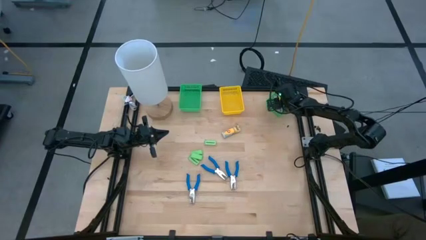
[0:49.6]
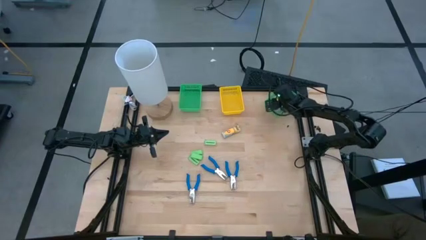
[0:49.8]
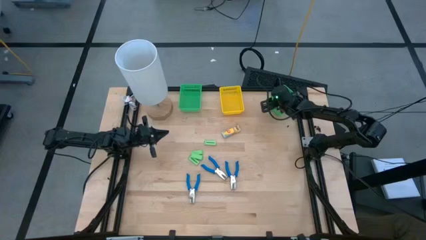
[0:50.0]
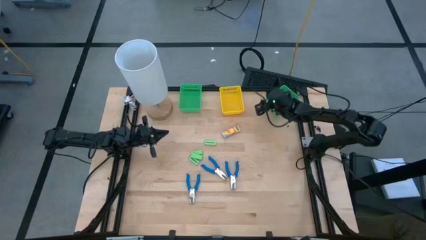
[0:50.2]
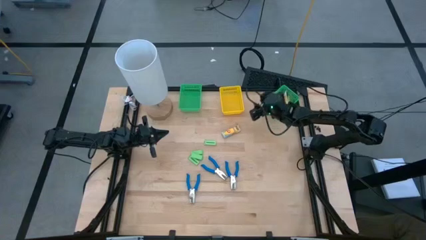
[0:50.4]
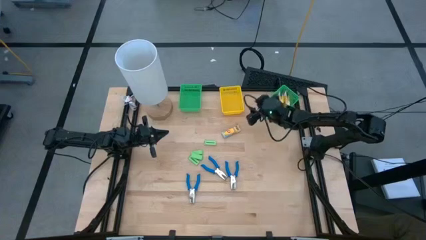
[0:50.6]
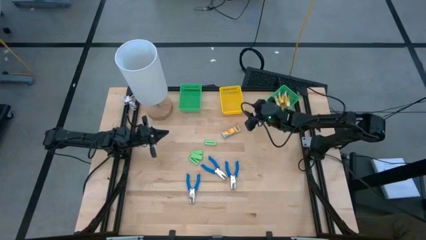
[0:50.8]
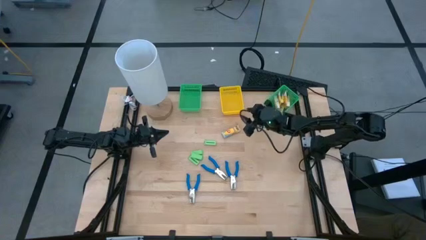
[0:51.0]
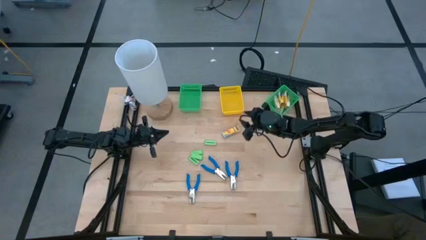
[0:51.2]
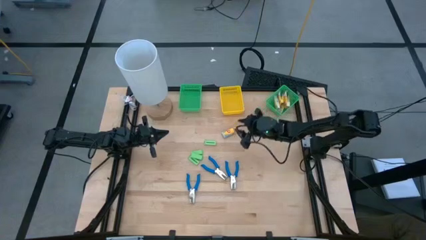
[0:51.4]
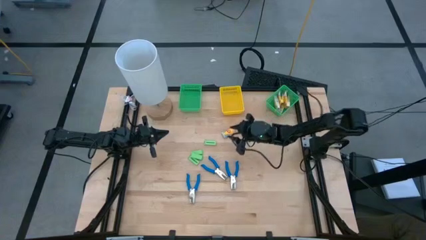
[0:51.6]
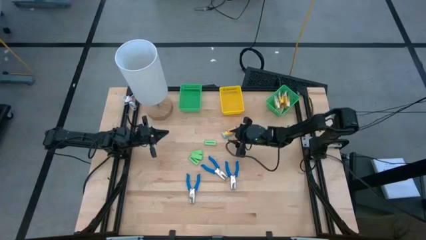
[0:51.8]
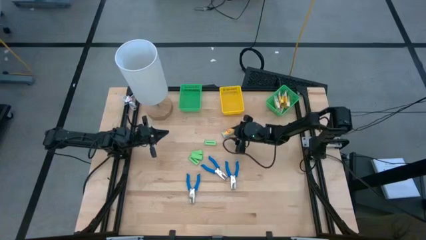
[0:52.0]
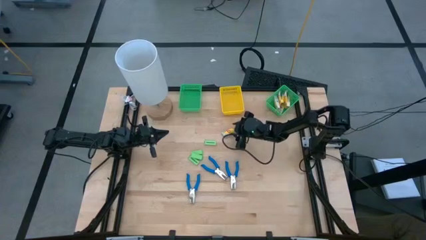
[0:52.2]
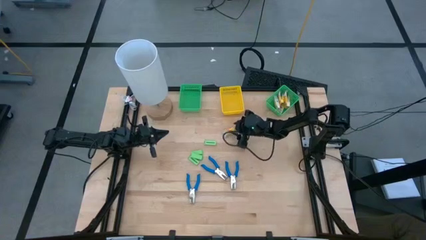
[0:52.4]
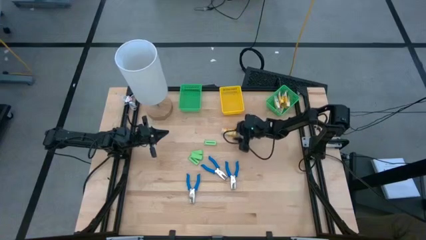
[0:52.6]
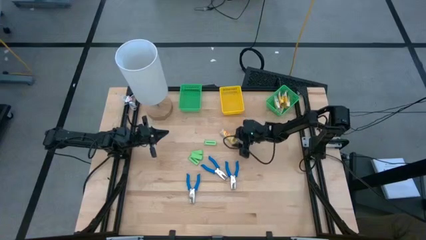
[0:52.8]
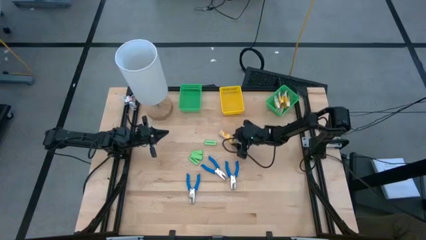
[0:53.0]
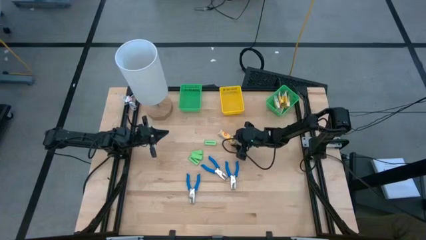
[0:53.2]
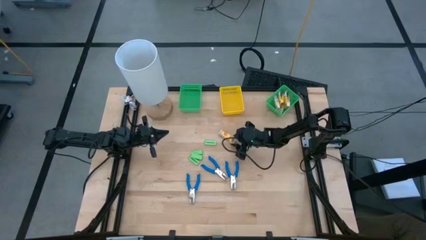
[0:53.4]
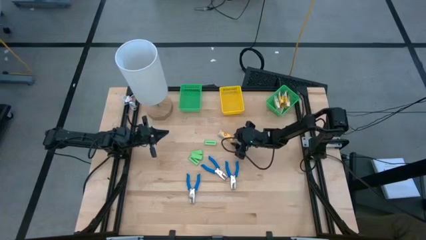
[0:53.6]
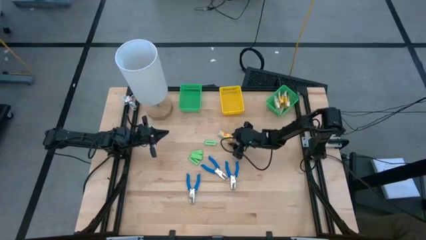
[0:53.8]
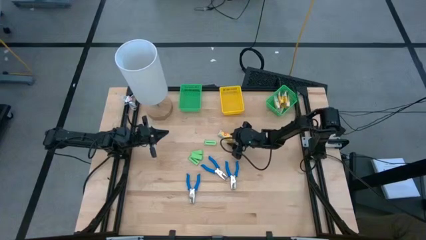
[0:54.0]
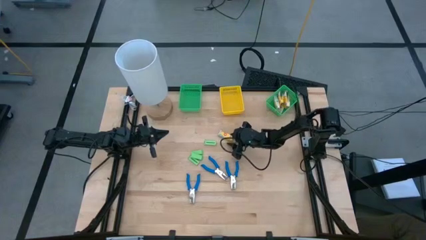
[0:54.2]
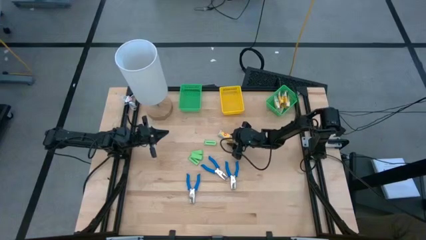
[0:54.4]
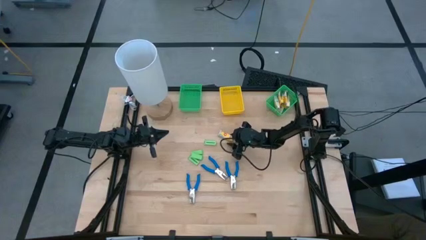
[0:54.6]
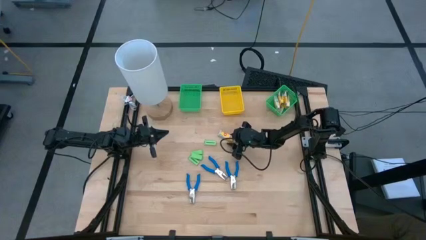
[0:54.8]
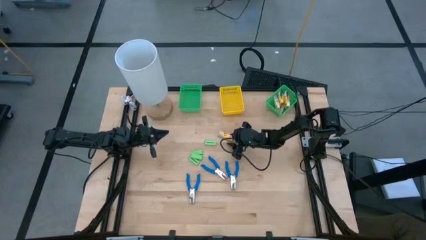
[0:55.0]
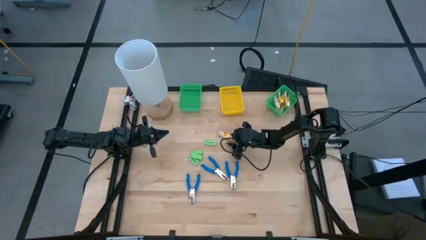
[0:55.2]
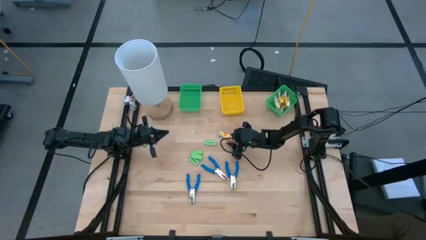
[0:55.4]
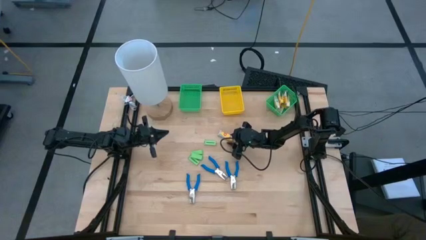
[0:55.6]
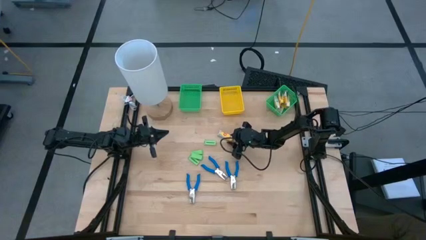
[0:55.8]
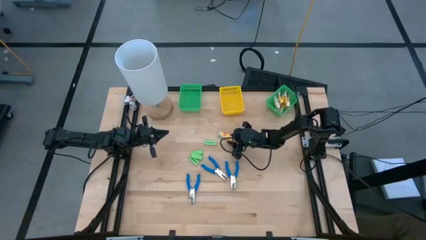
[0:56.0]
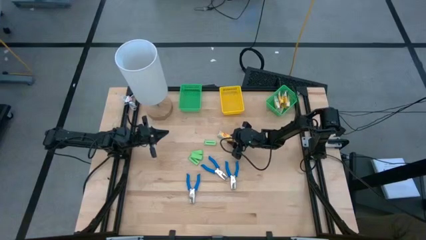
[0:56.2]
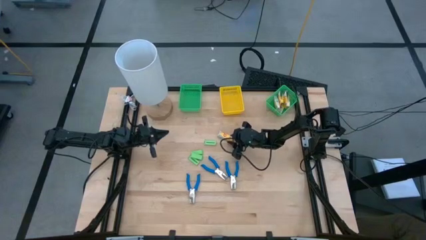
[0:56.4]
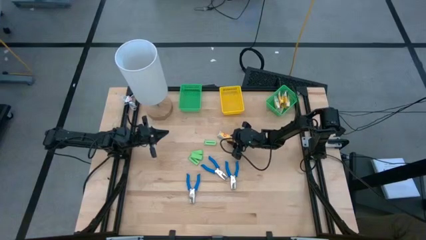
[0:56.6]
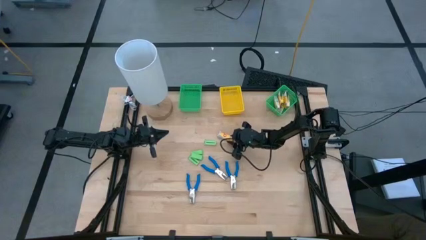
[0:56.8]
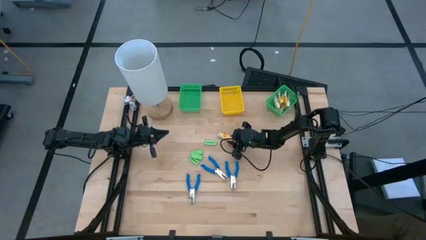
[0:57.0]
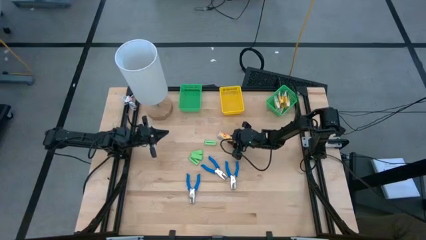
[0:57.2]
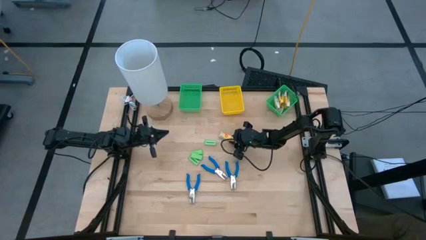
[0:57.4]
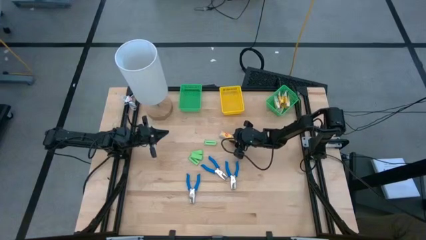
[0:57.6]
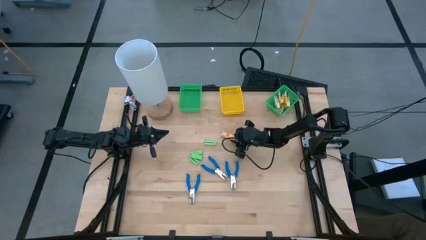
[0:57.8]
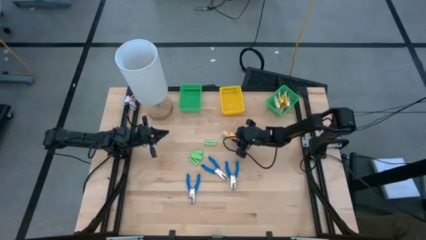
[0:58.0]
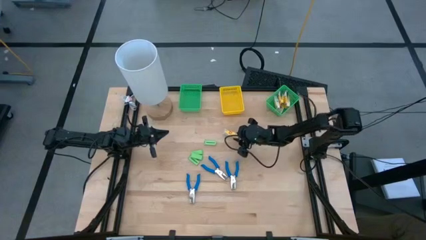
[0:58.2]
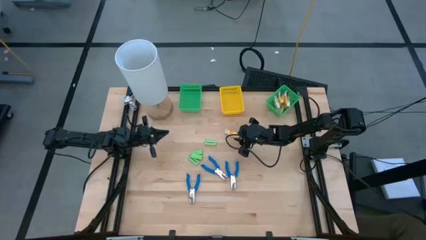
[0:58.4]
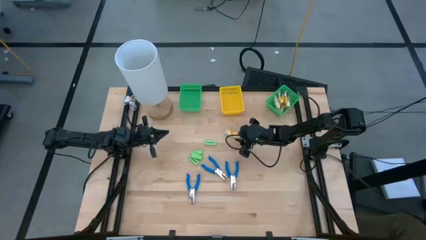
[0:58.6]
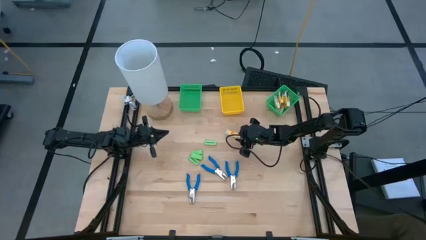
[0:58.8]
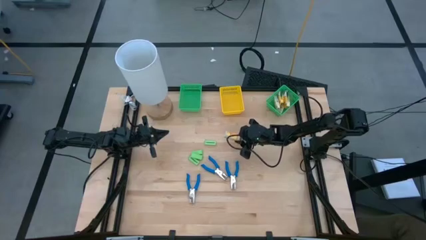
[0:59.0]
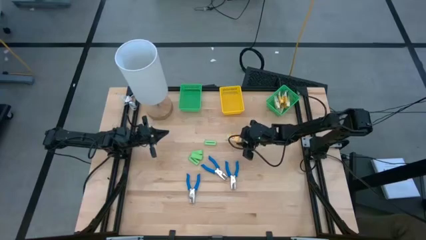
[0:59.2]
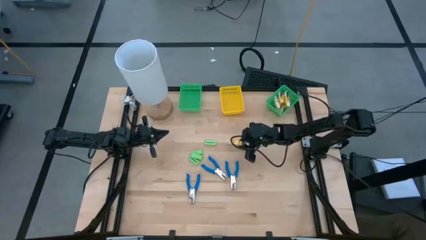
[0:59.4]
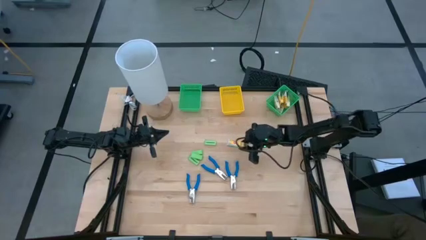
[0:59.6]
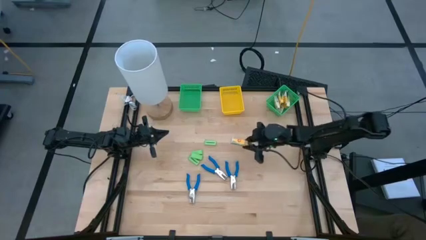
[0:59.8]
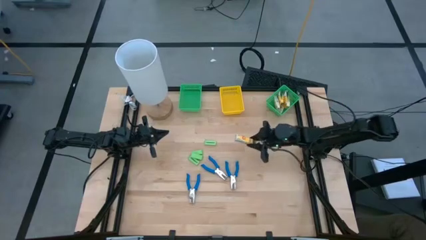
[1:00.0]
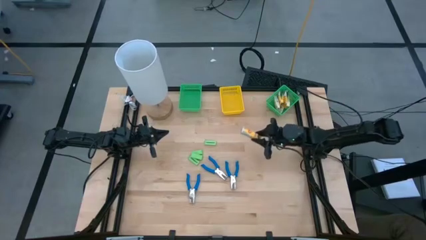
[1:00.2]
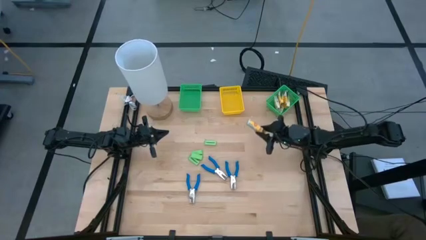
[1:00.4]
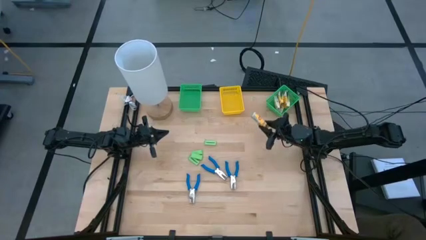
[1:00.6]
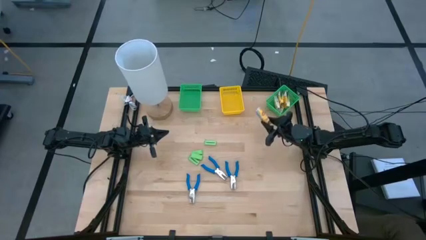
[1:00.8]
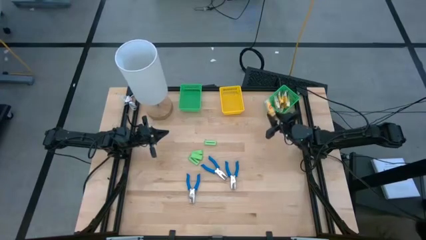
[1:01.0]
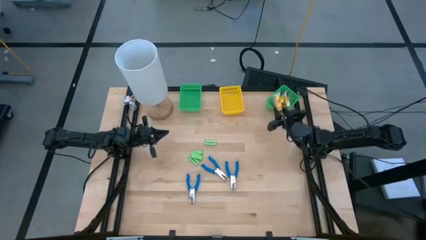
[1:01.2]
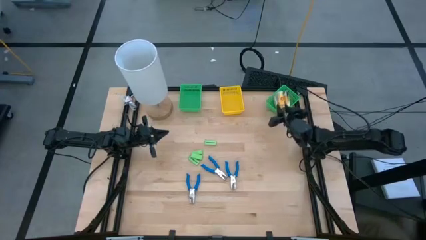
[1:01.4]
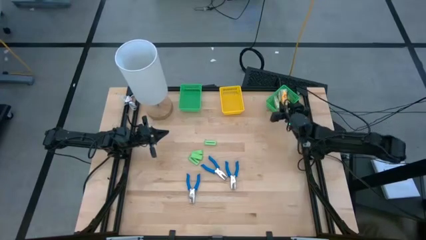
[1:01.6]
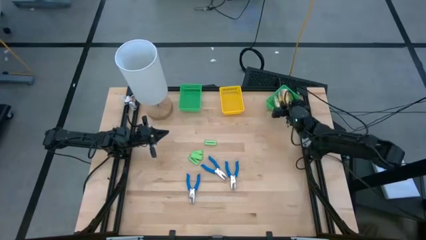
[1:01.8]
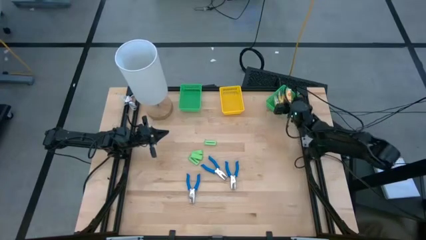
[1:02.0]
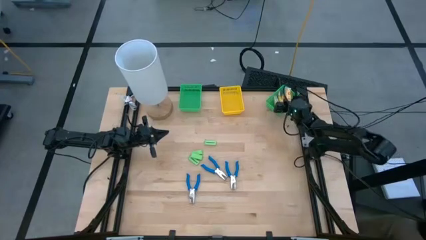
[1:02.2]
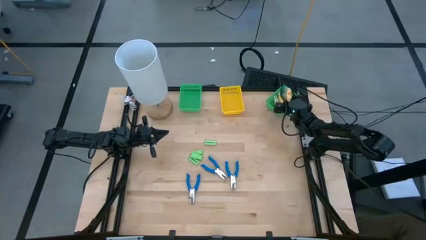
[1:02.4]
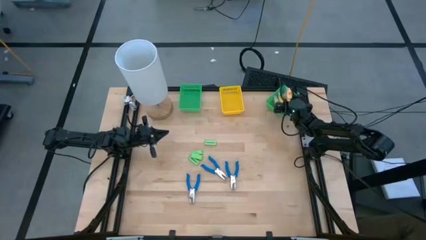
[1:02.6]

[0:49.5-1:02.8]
Task: Pick & Place School Supplies
Put the yellow crayon box into the right green bin

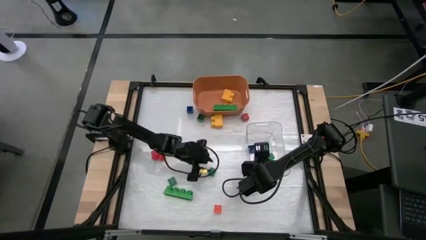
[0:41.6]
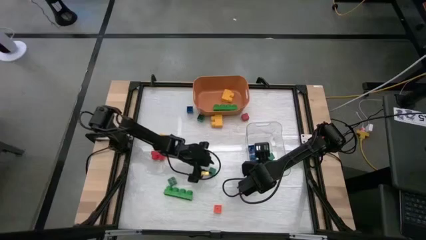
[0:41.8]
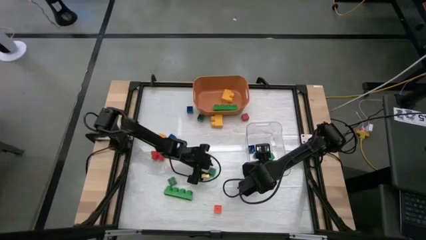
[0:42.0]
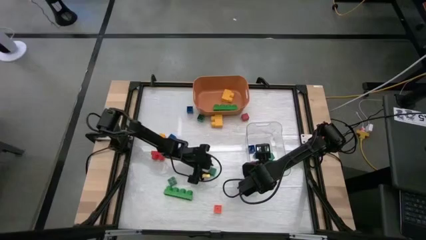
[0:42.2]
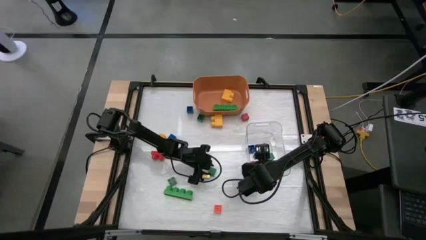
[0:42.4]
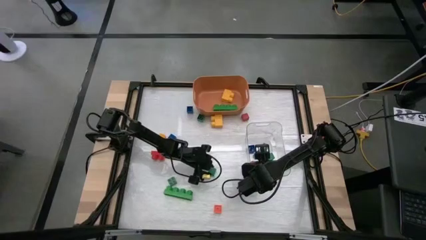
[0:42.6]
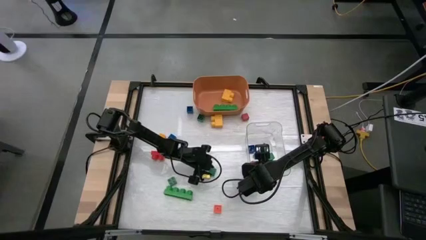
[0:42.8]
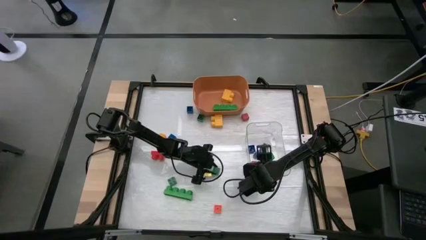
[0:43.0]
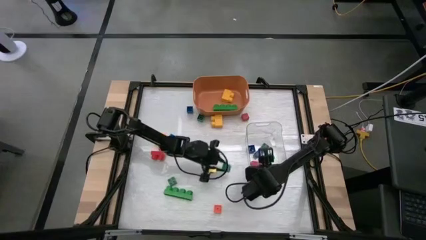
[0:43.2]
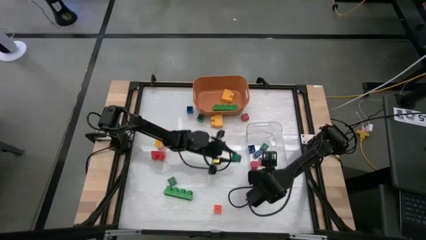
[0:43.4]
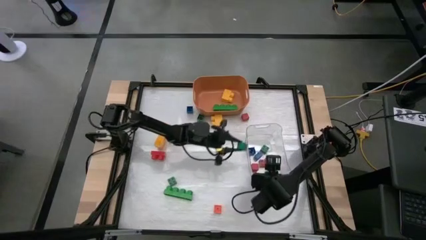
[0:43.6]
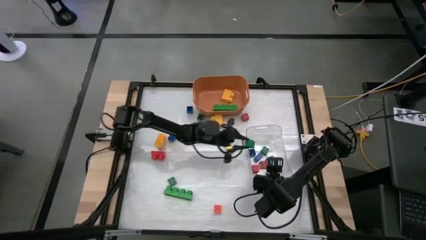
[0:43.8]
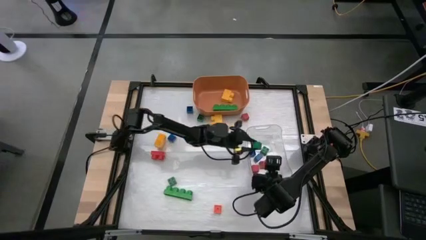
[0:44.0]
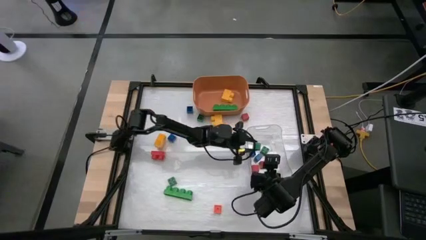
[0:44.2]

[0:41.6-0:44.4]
Task: Sort blocks by size
Put the small green block into the transparent bin
